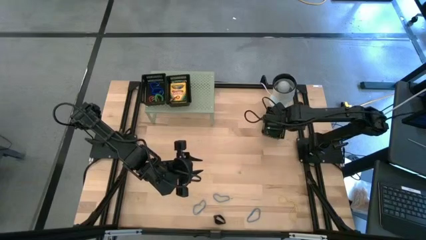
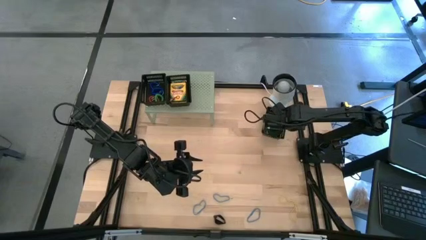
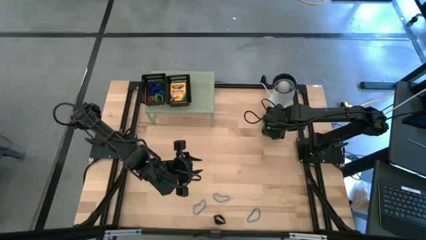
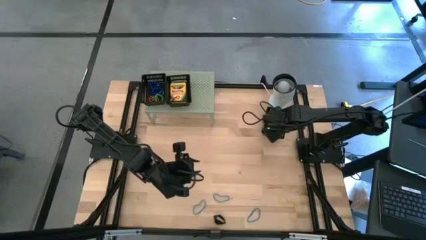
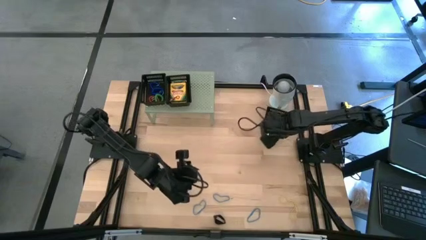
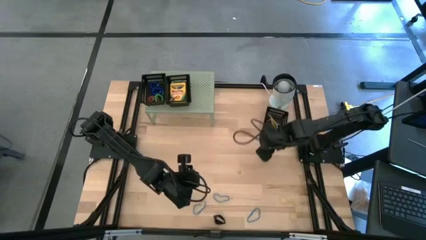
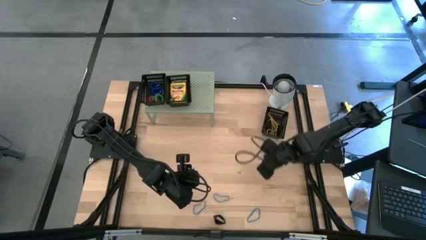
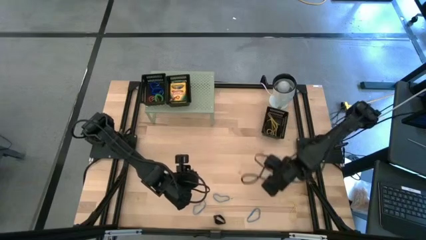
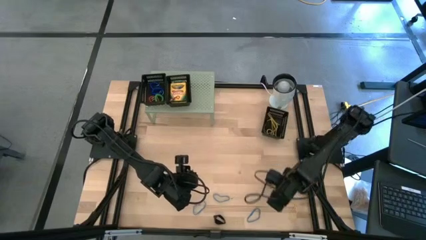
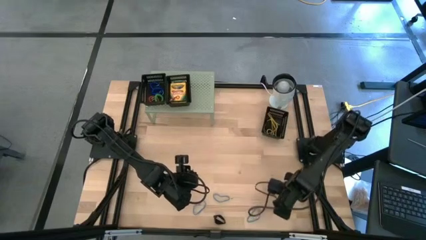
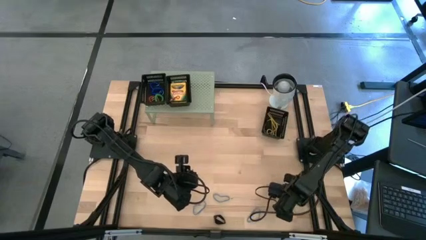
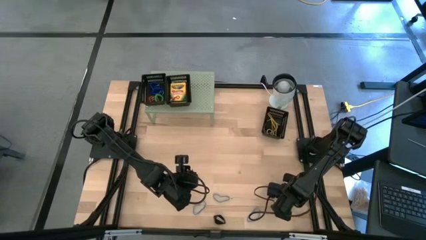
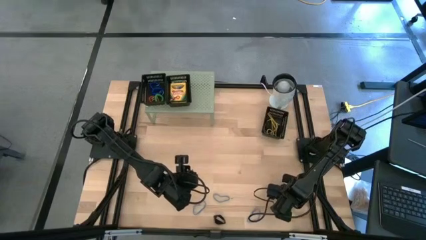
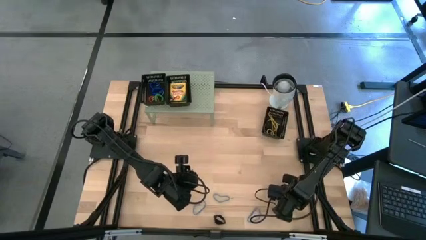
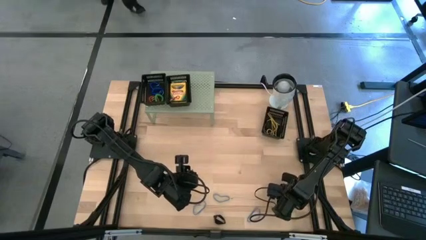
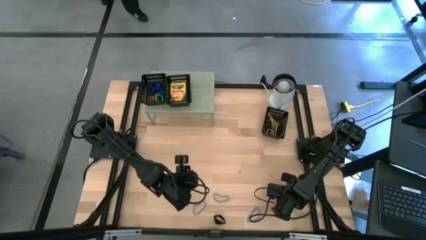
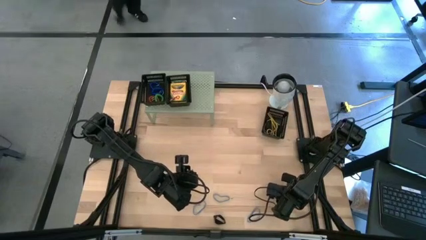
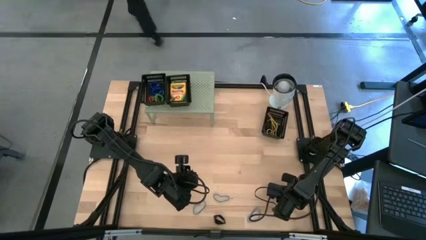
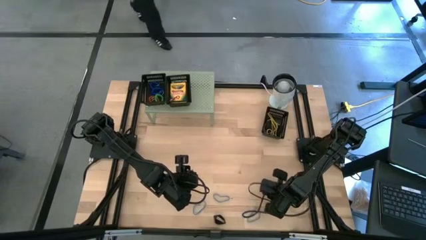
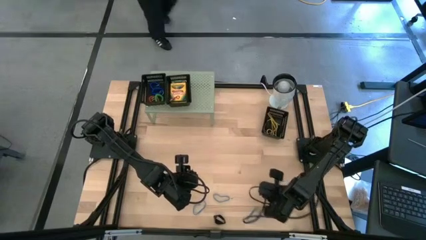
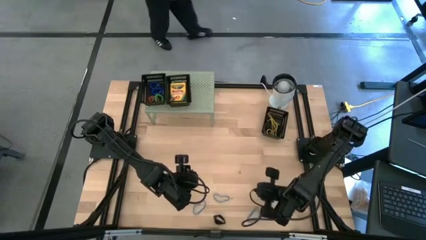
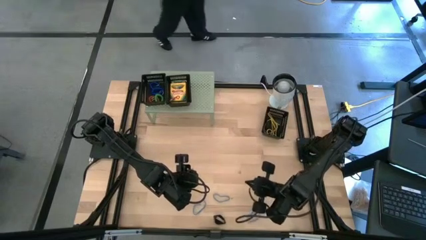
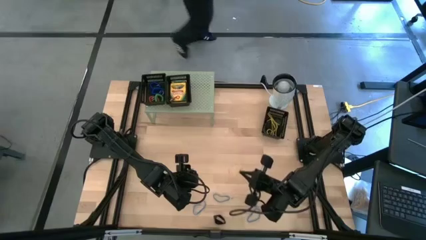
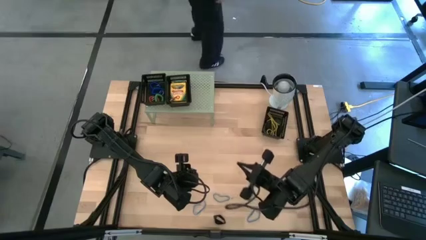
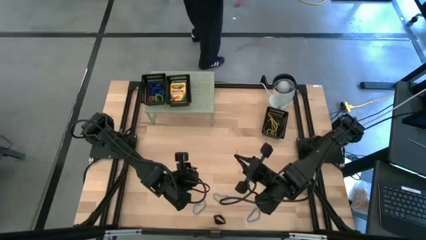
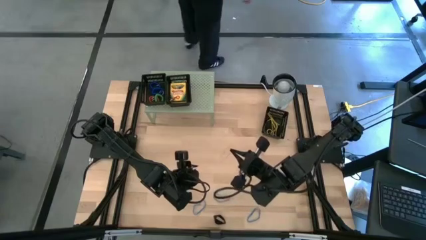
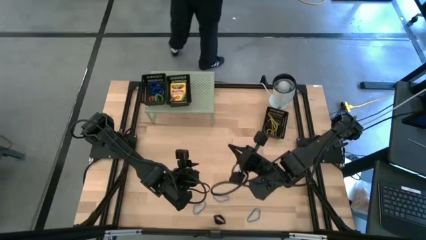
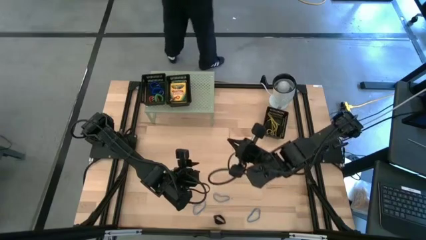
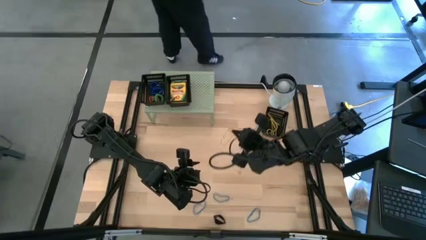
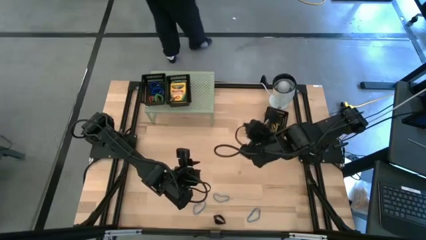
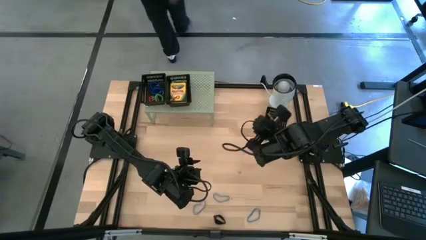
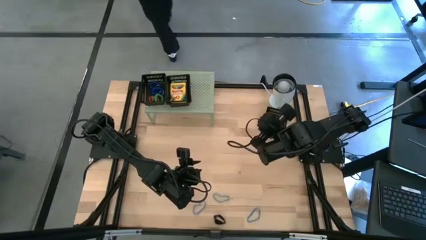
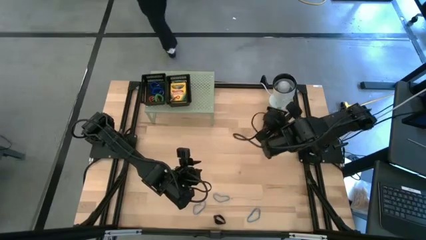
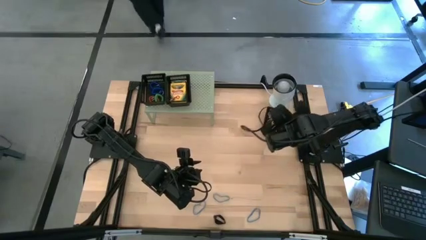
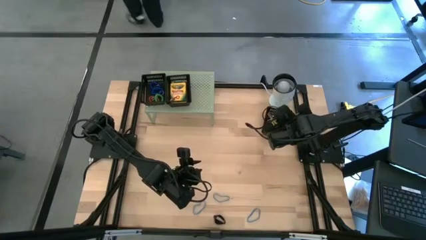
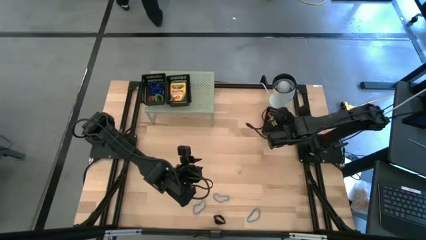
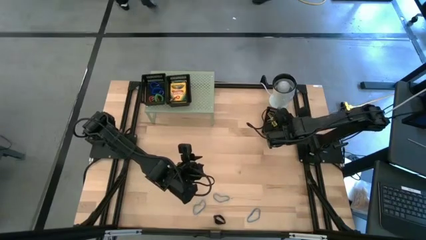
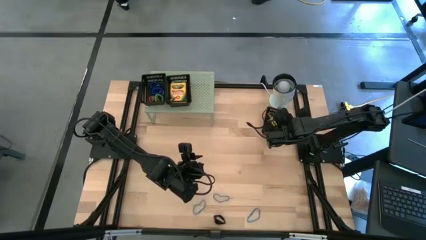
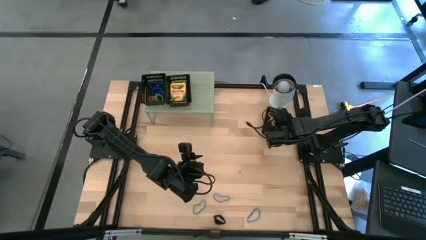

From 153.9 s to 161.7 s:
Task: Pick & Place Office Desk Supplies
Put the yellow rubber band into the black bin

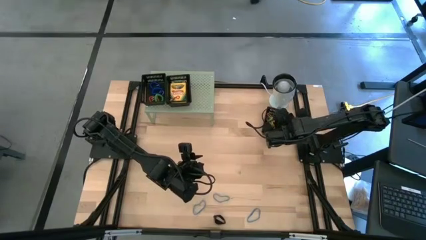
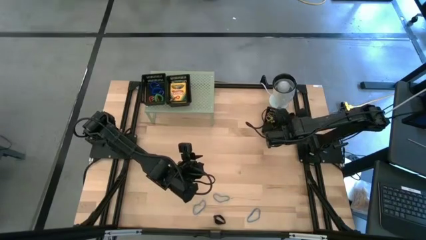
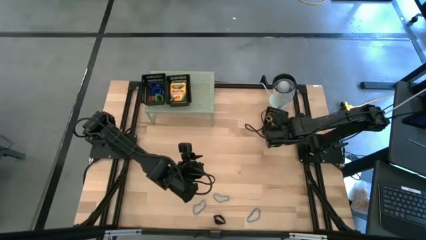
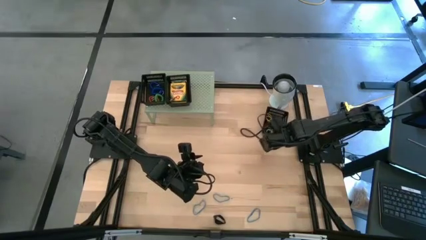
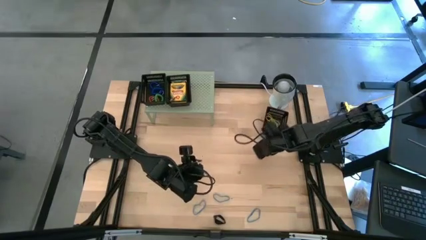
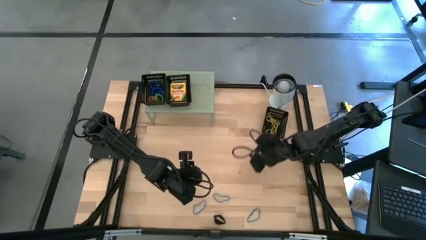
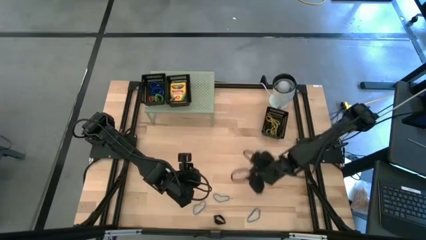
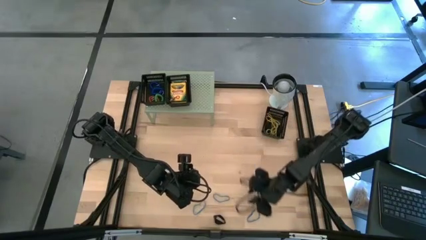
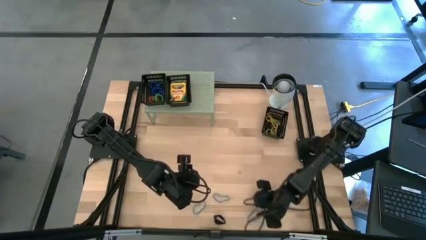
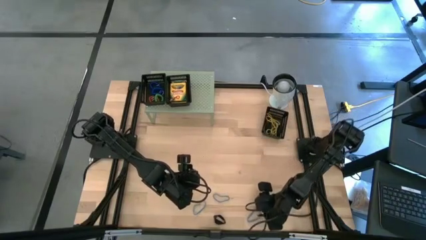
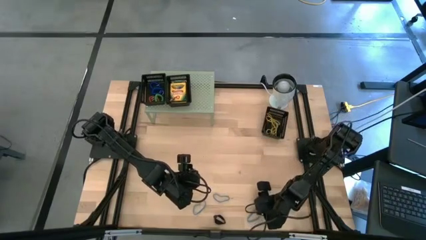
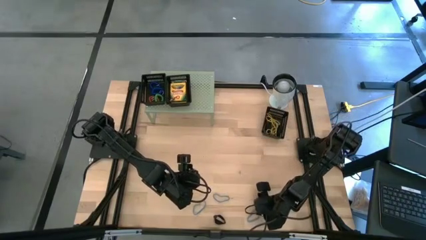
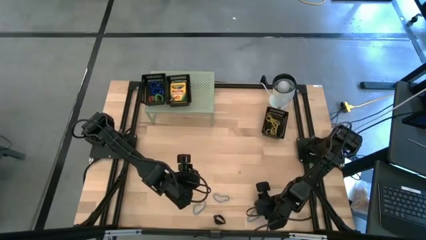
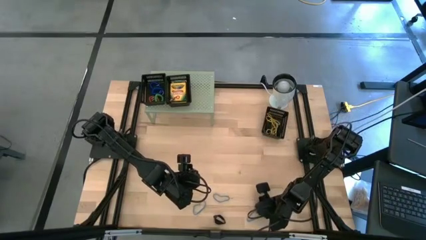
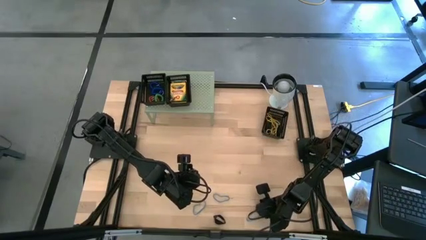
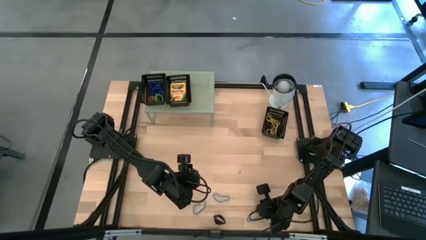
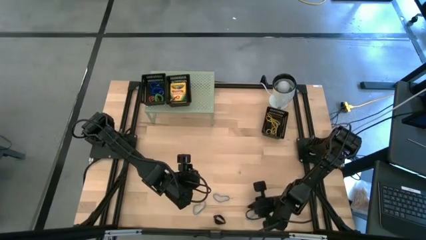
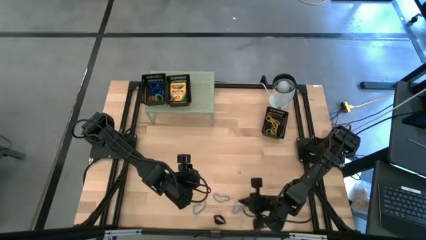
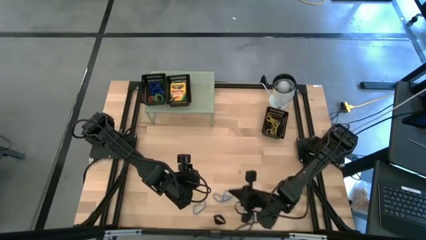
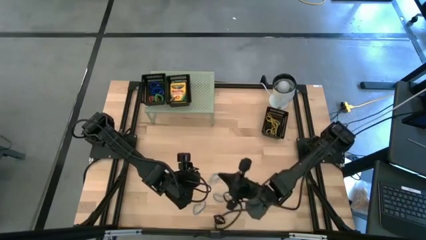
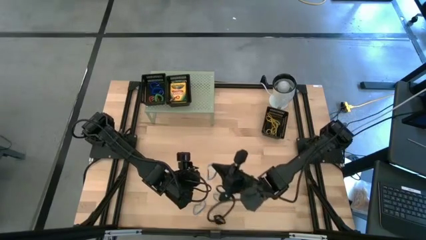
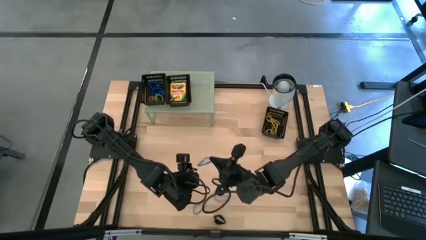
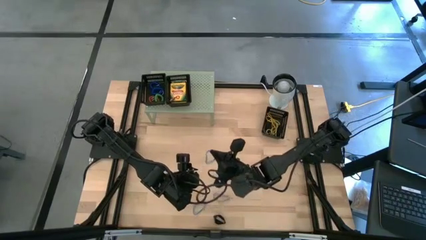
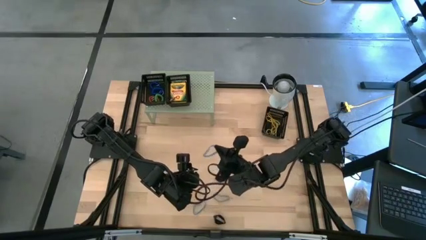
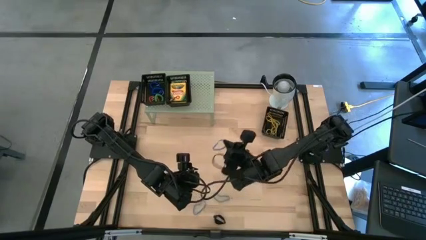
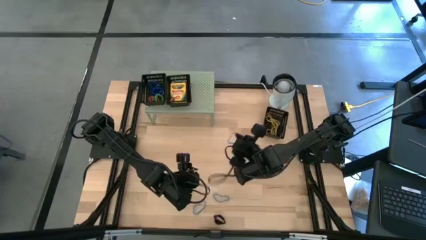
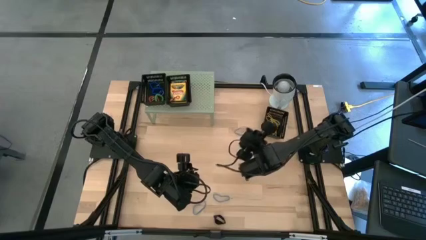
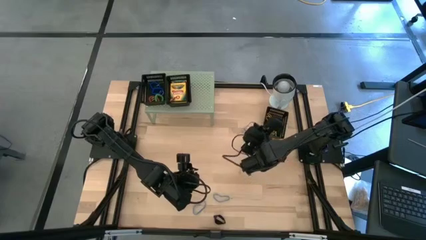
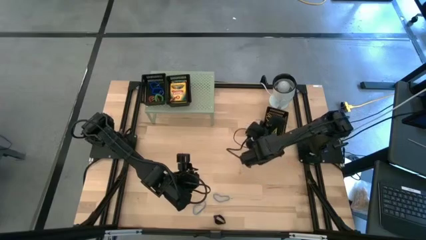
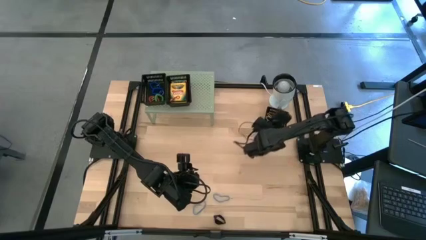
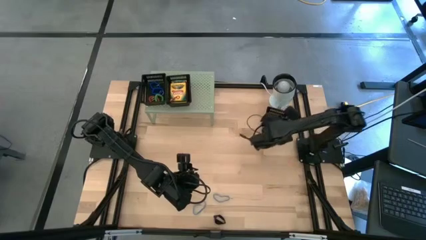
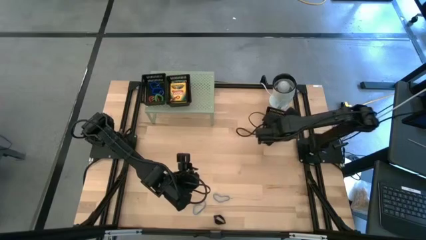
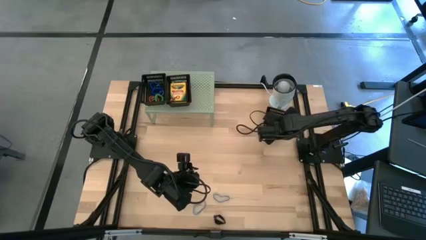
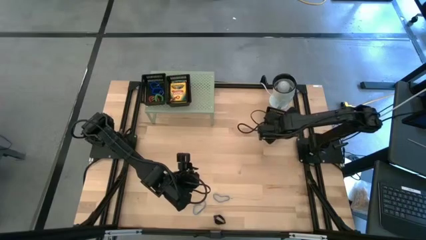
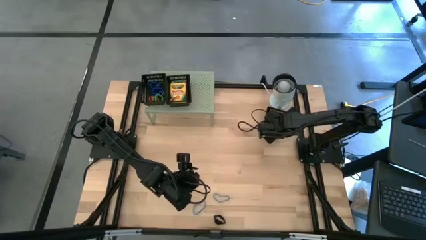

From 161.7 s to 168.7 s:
Put the blue rubber band into the black bin
